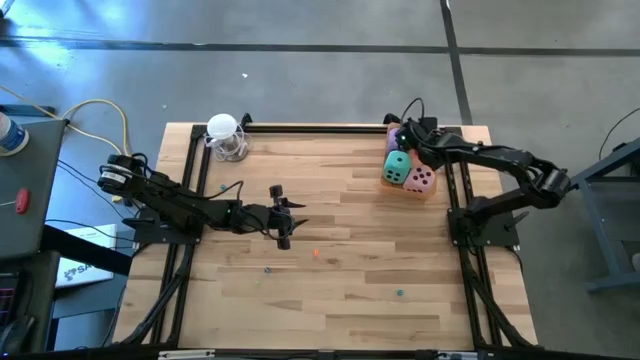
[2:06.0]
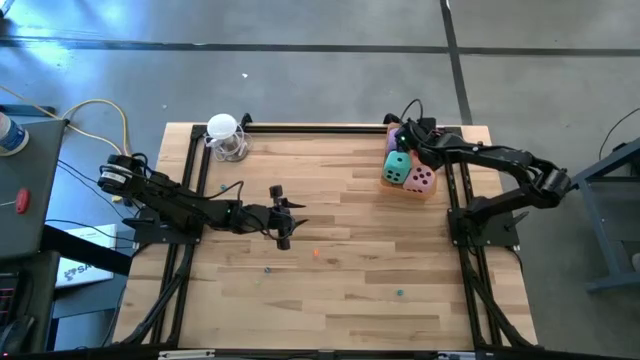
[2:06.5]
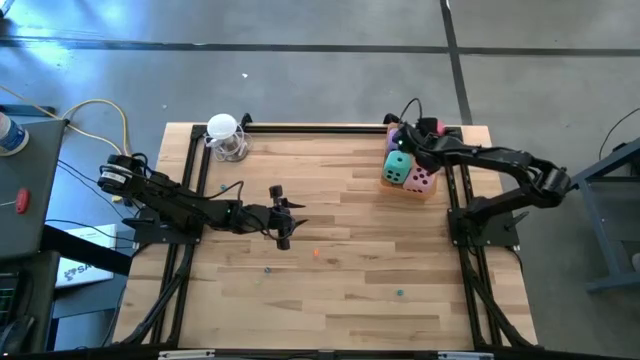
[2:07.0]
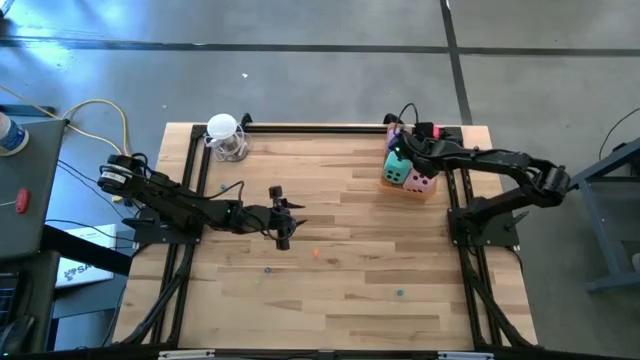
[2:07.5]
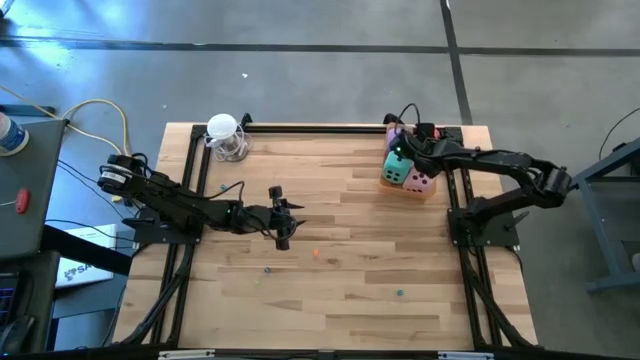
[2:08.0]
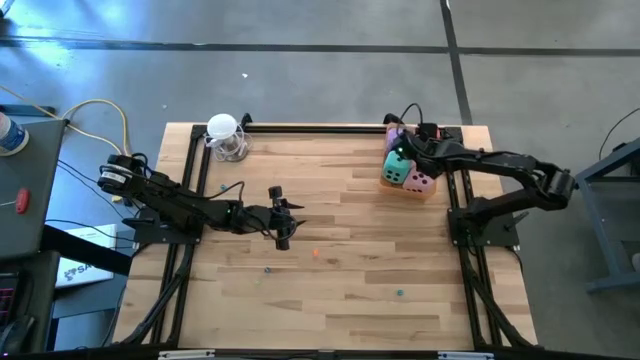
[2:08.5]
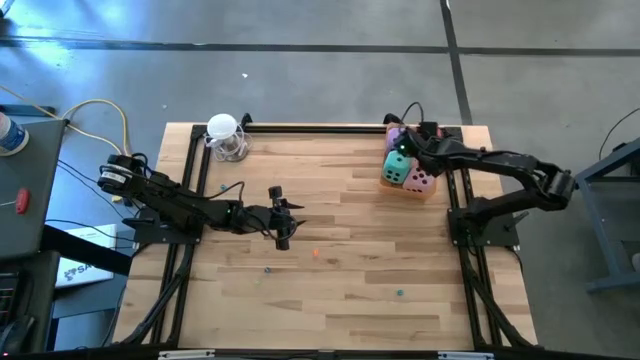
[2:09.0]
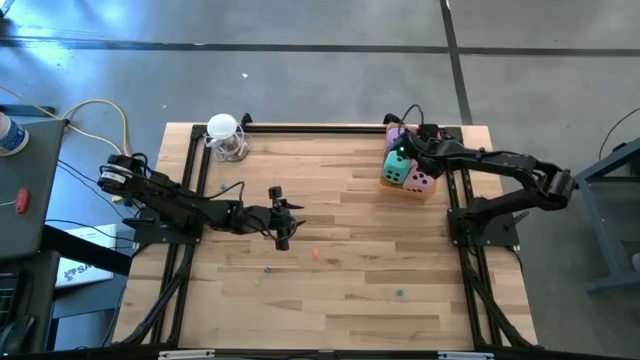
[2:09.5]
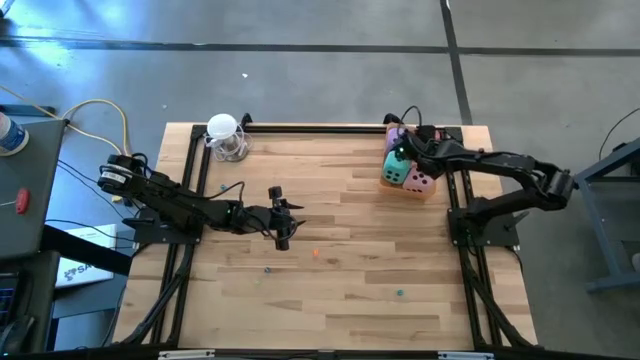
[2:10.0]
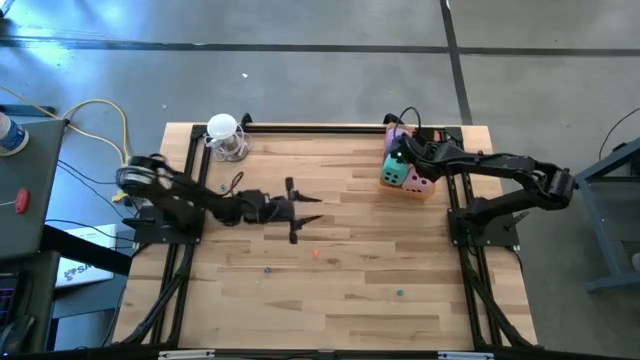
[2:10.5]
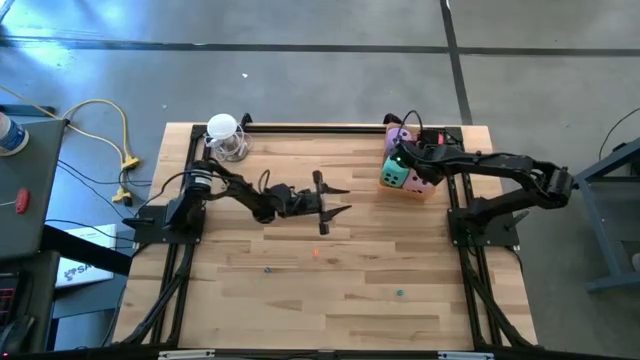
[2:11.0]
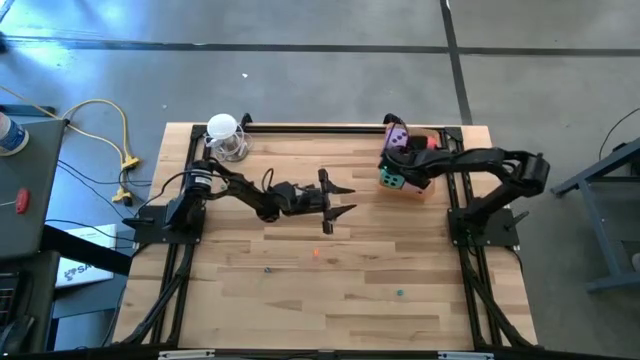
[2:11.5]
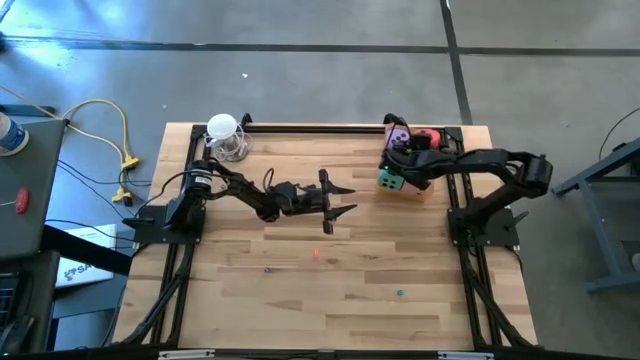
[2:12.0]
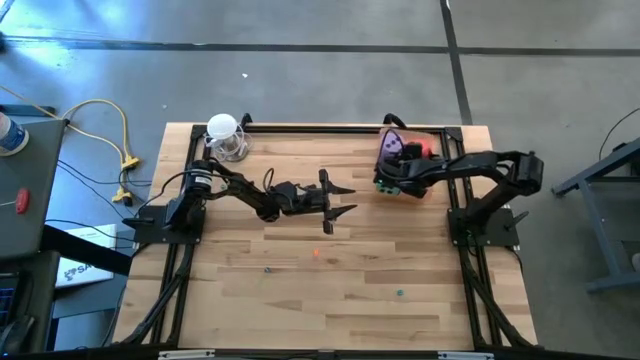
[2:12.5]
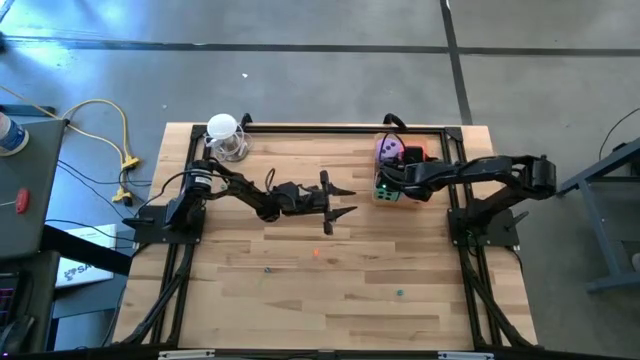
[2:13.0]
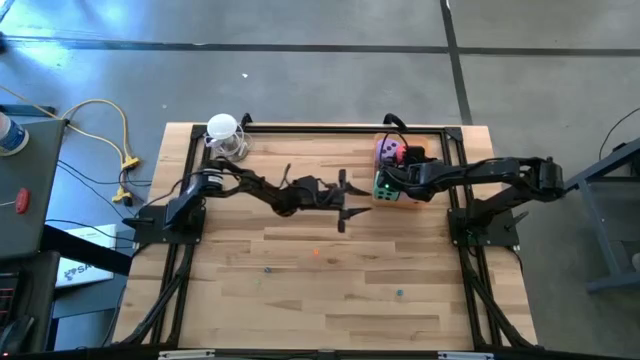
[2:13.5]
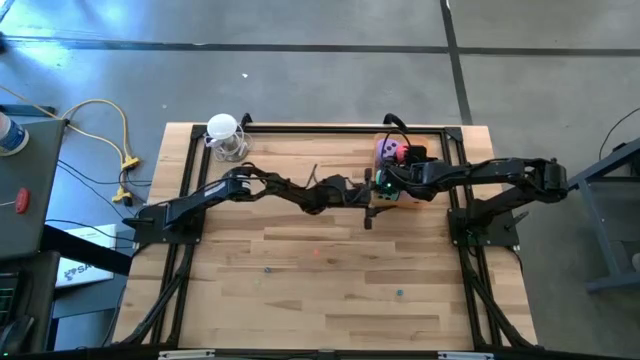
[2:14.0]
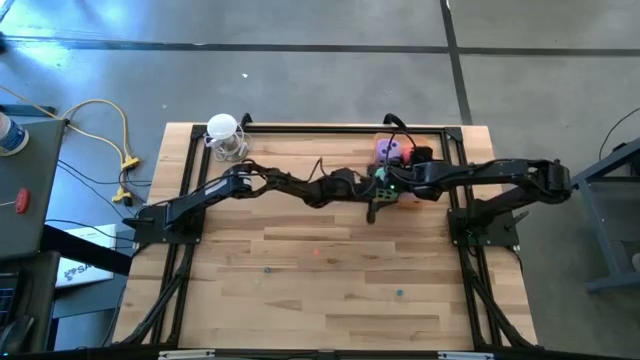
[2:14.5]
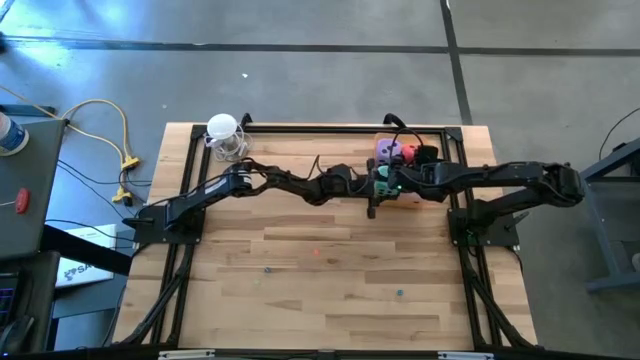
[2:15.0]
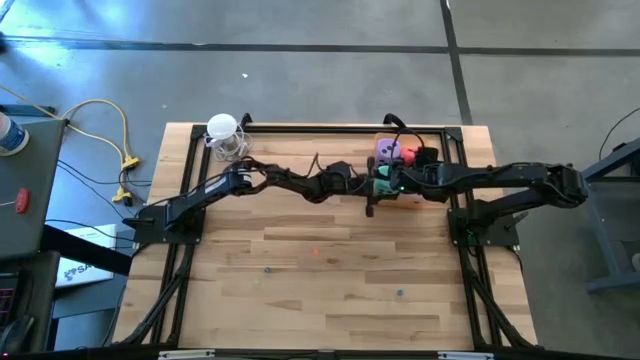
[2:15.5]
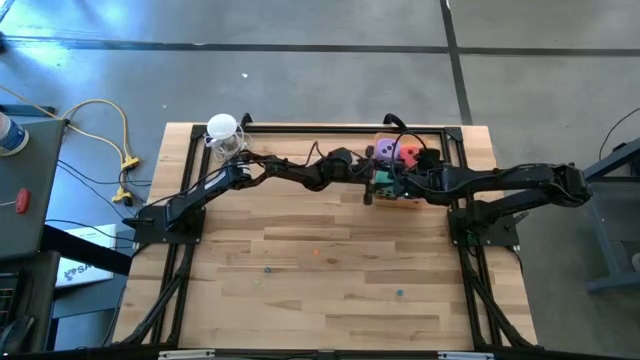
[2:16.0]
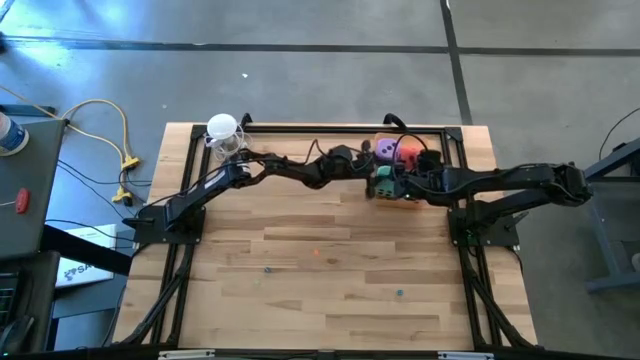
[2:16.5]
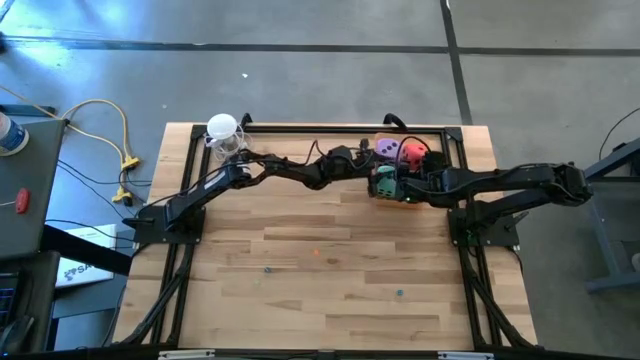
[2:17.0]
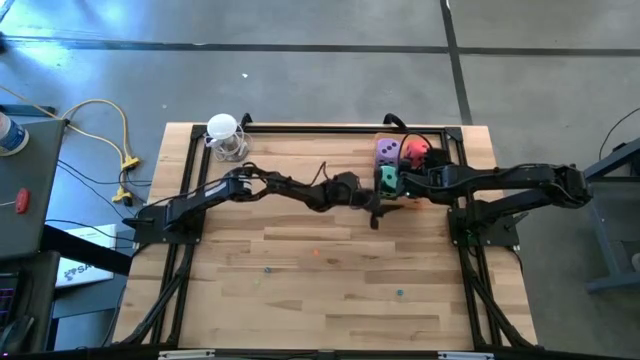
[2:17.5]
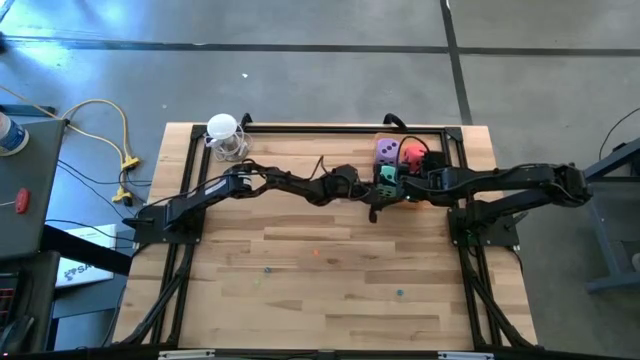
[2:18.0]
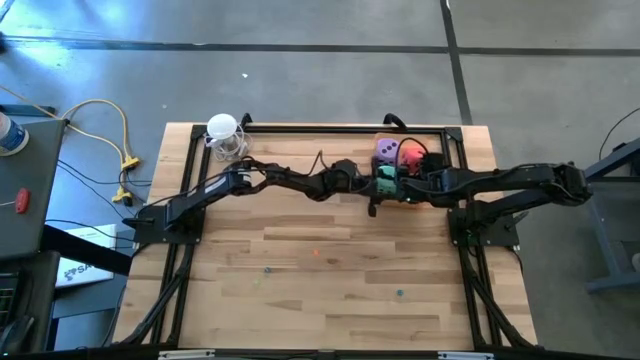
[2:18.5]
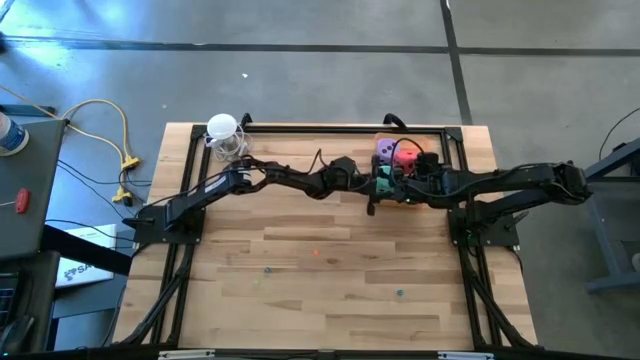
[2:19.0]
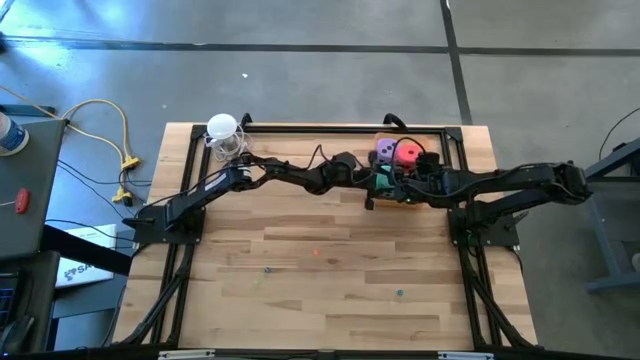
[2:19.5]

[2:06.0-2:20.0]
Task: Pick & Place Dice
Put the red large die into the orange bin

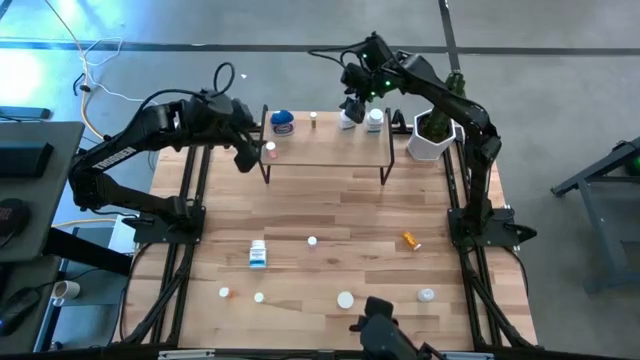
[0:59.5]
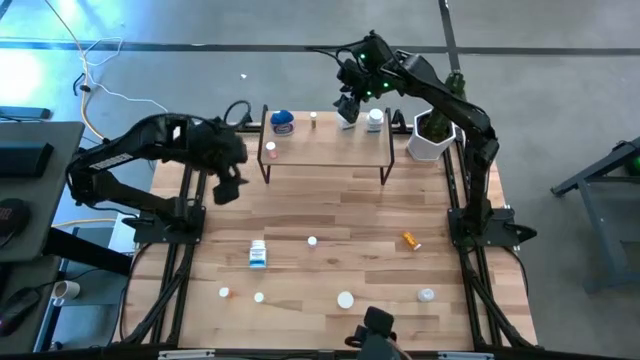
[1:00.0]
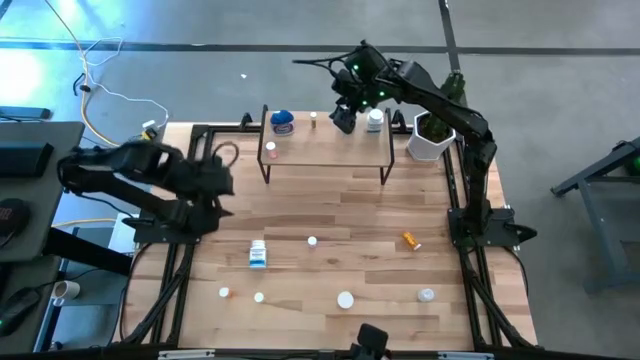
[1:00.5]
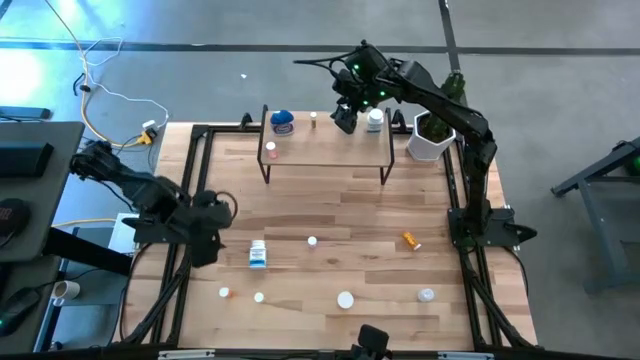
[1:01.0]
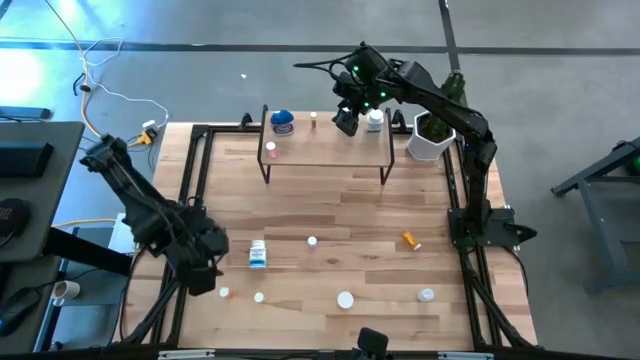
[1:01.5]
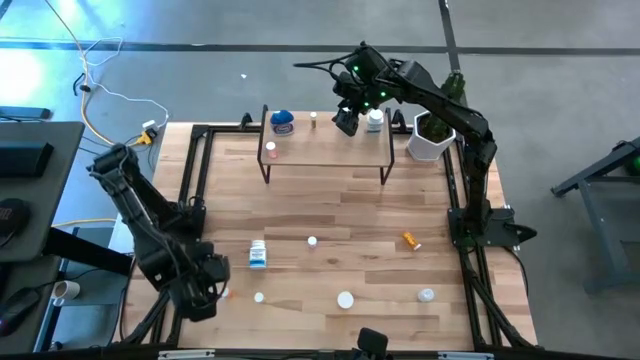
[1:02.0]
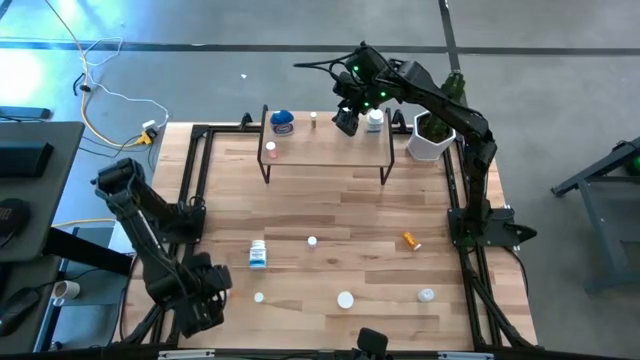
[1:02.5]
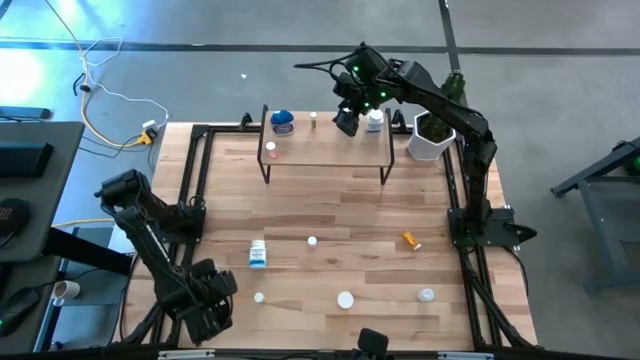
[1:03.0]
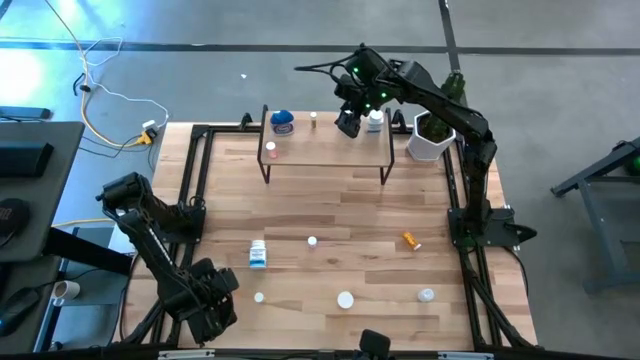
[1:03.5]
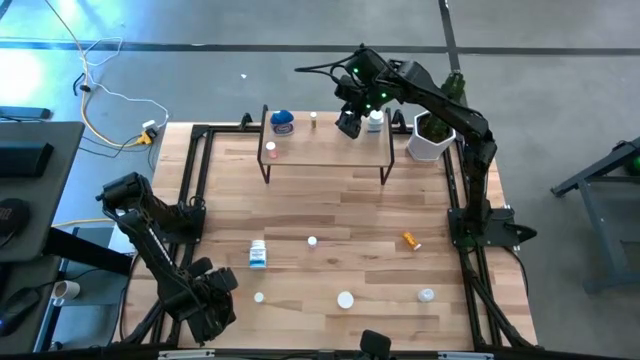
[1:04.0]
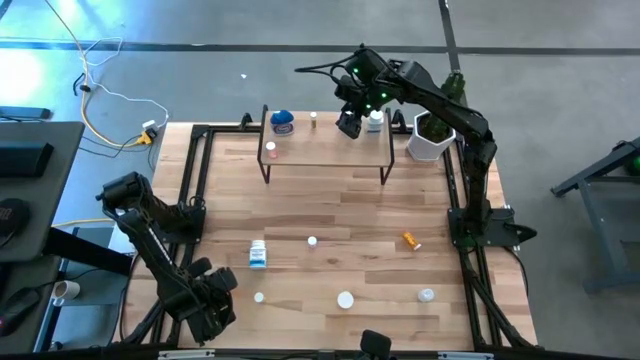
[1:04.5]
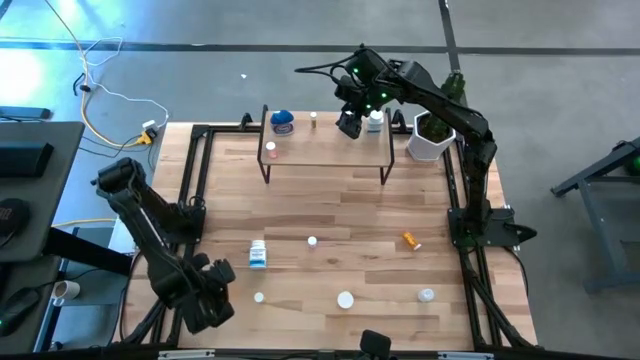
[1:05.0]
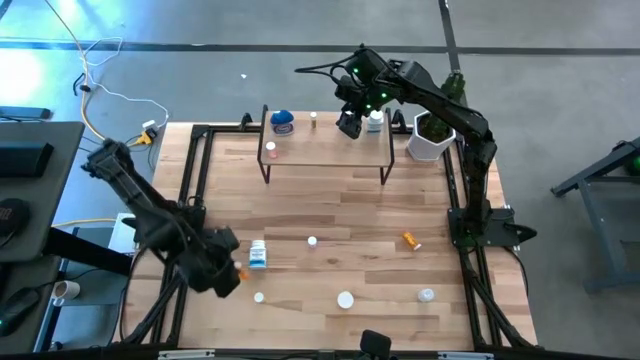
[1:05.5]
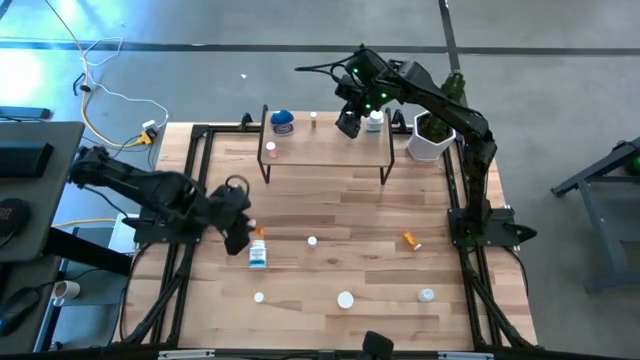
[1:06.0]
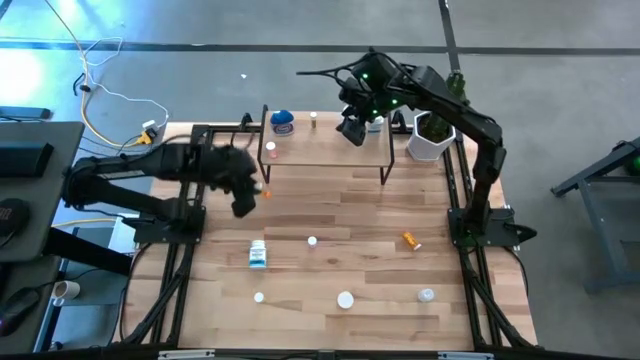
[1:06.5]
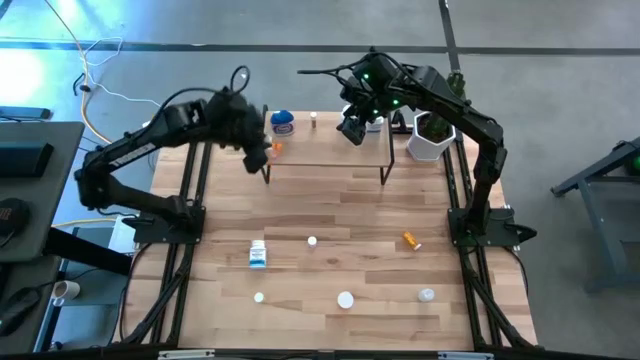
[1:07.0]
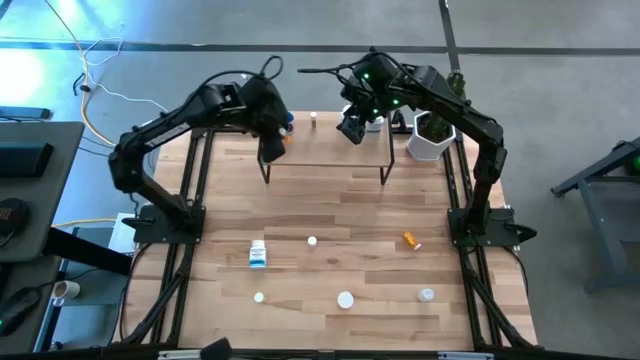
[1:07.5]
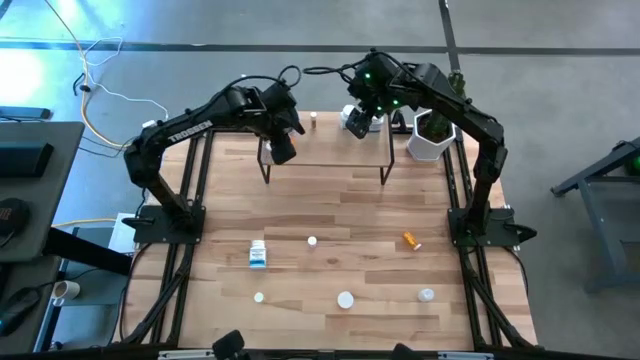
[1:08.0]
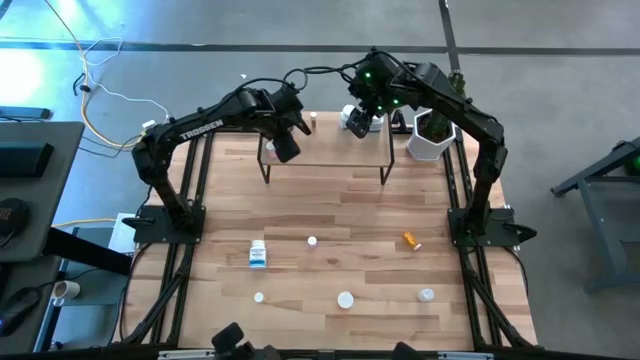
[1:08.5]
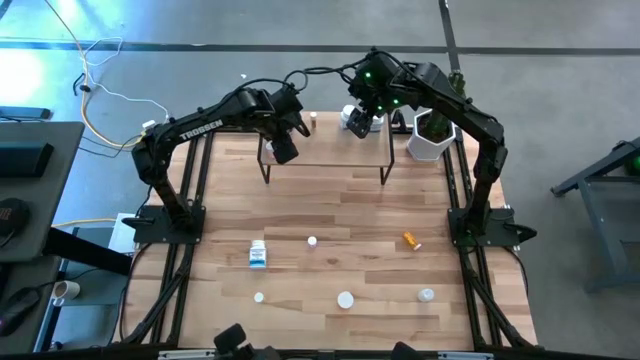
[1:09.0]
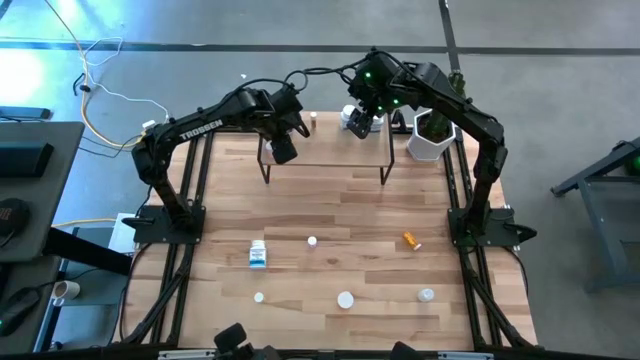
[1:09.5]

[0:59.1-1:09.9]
Task: Pick and place medicine bottles onto shelf by color
Put the orange pill bottle on the shelf
